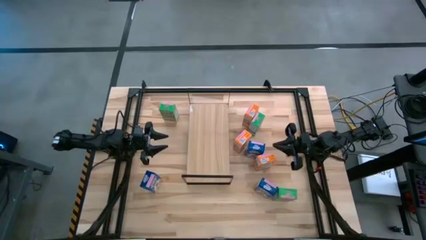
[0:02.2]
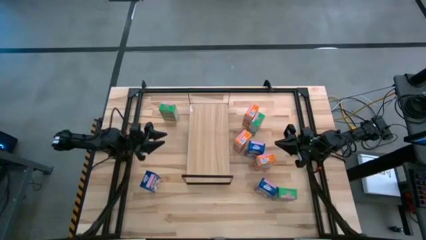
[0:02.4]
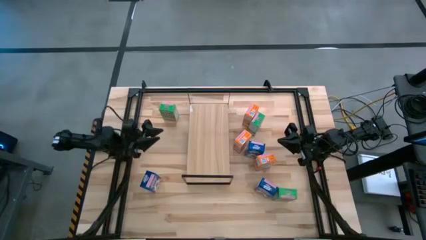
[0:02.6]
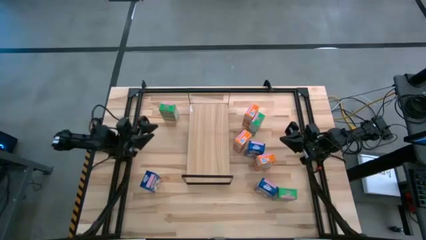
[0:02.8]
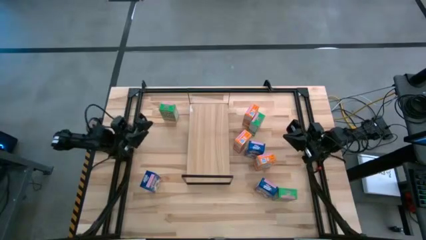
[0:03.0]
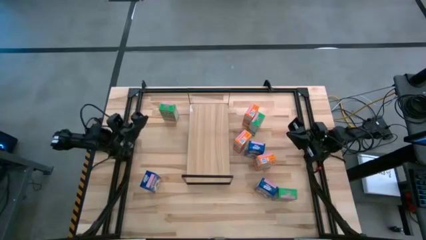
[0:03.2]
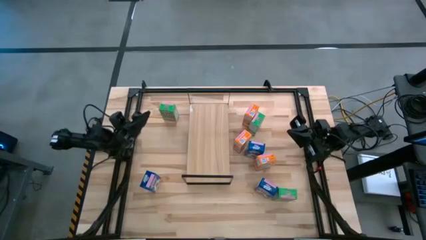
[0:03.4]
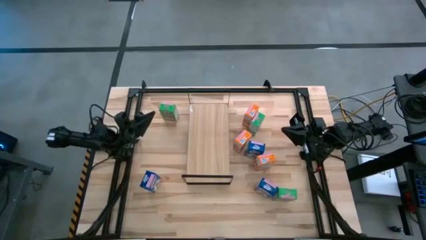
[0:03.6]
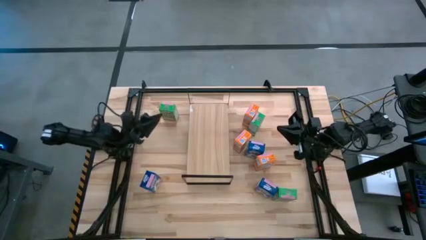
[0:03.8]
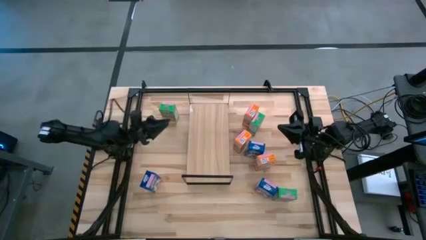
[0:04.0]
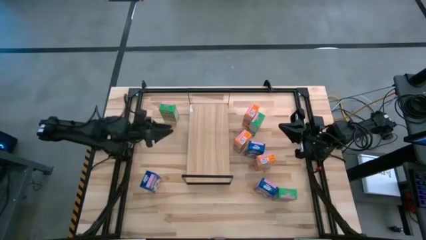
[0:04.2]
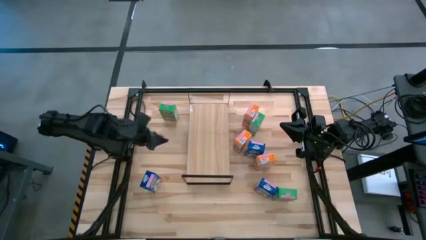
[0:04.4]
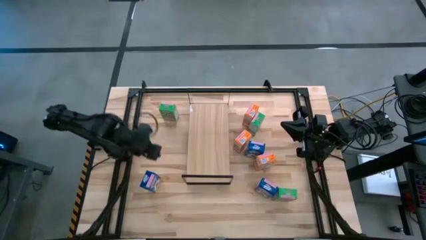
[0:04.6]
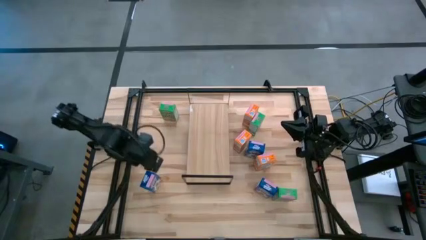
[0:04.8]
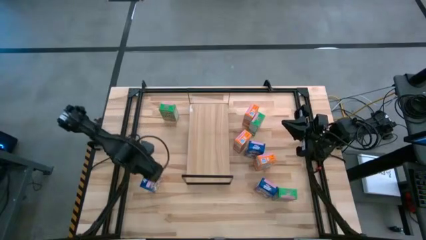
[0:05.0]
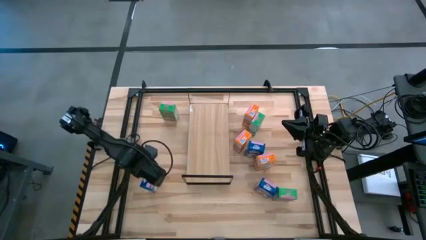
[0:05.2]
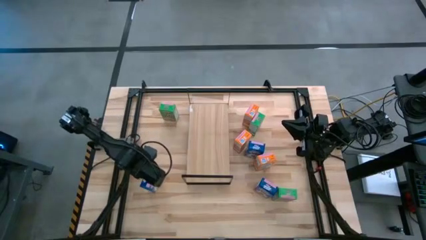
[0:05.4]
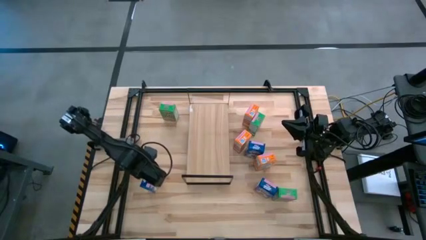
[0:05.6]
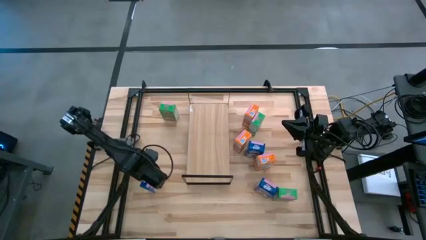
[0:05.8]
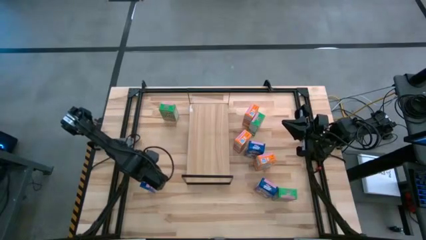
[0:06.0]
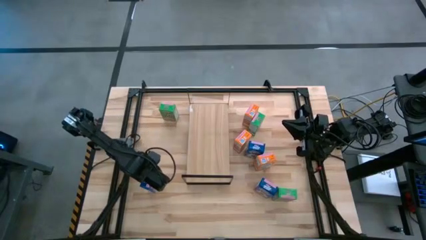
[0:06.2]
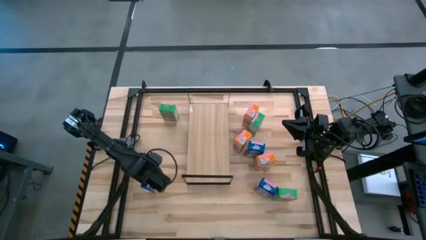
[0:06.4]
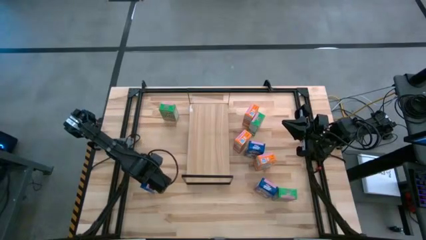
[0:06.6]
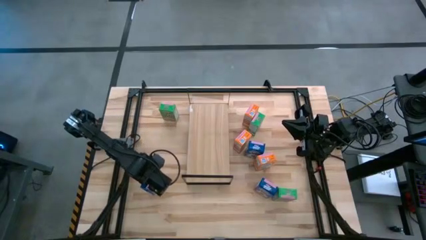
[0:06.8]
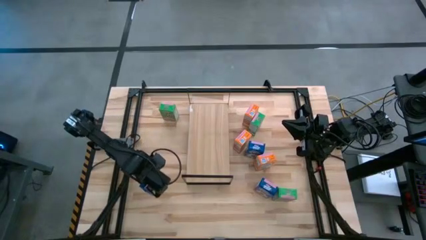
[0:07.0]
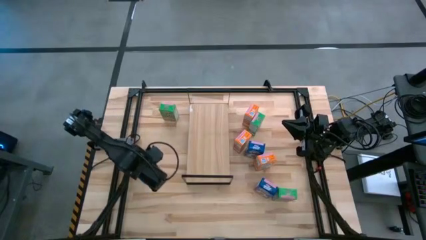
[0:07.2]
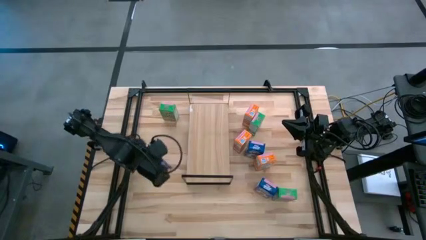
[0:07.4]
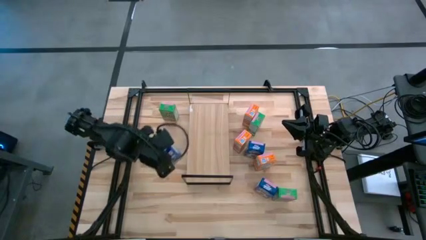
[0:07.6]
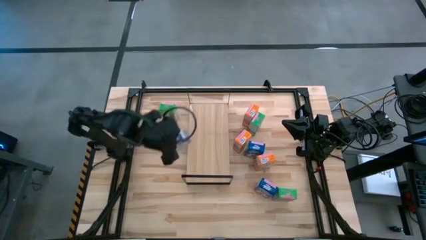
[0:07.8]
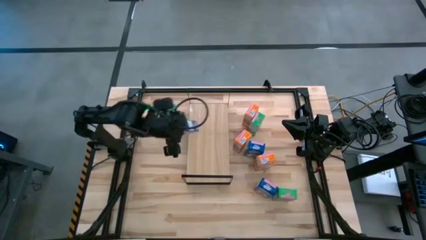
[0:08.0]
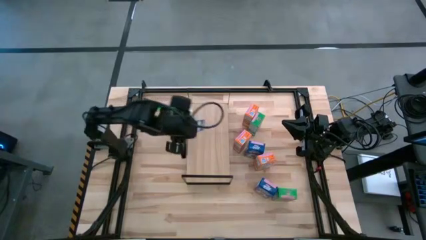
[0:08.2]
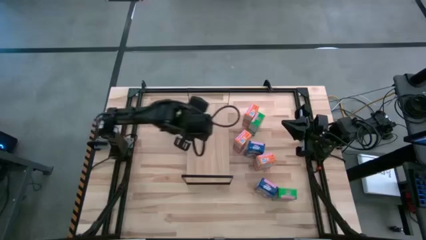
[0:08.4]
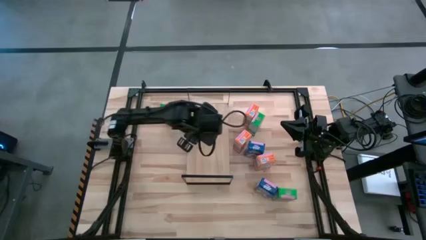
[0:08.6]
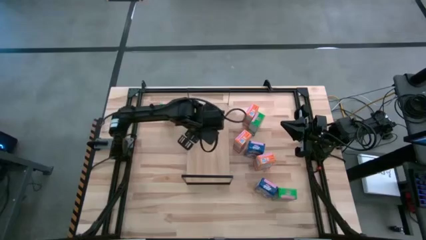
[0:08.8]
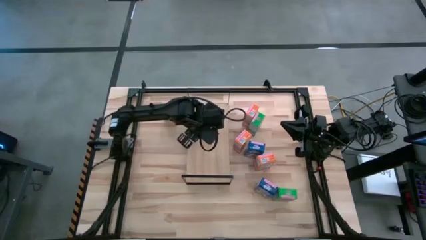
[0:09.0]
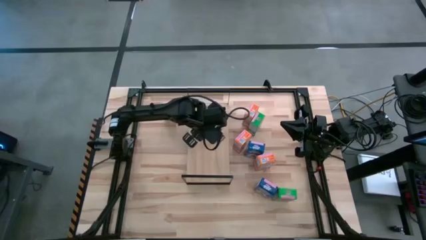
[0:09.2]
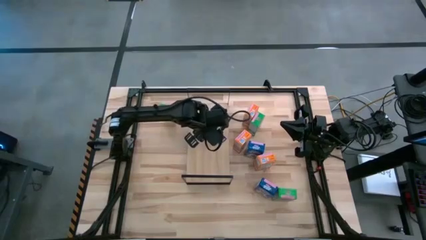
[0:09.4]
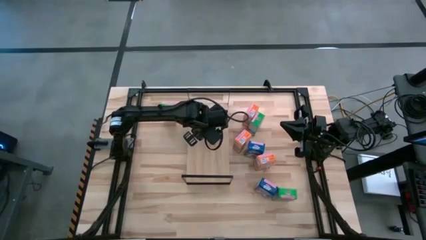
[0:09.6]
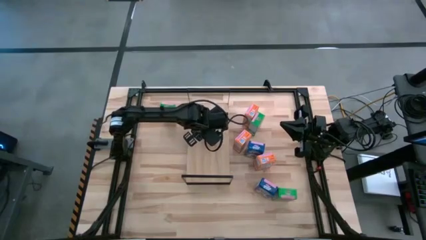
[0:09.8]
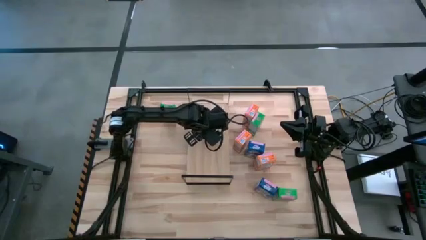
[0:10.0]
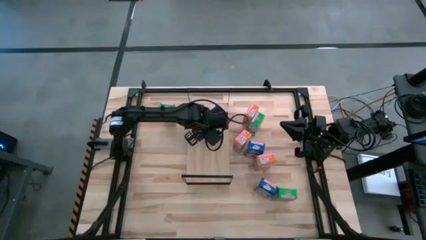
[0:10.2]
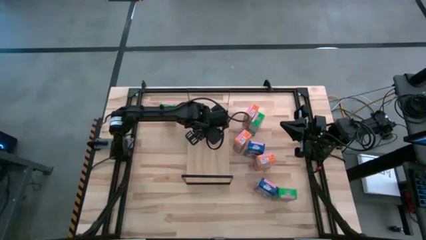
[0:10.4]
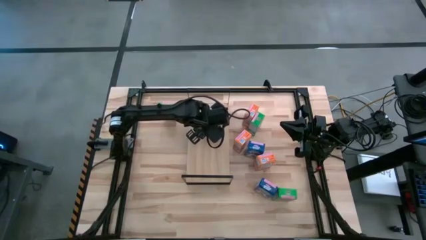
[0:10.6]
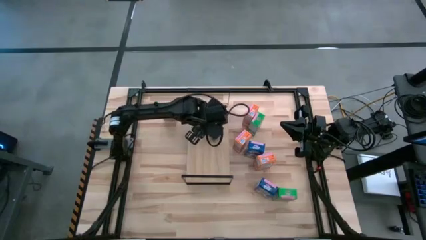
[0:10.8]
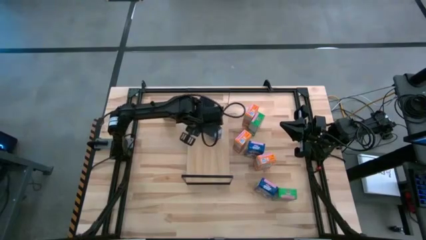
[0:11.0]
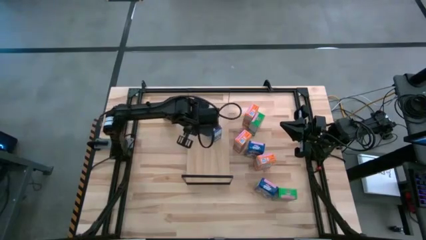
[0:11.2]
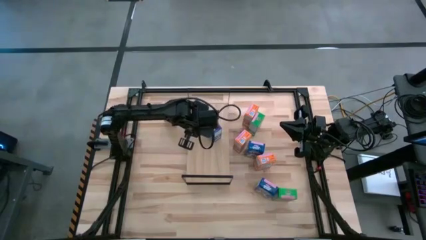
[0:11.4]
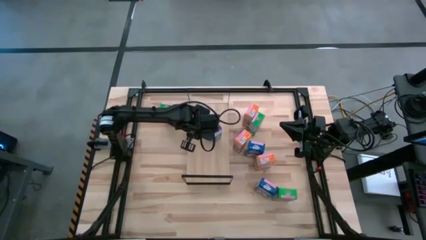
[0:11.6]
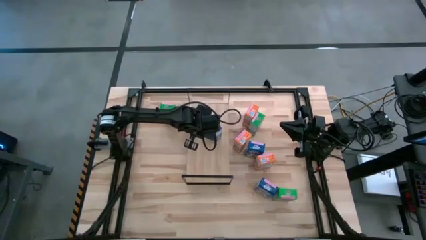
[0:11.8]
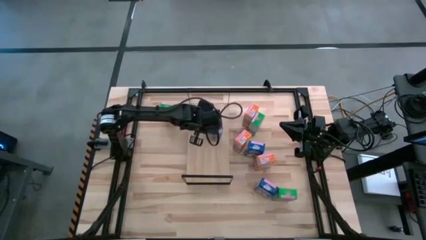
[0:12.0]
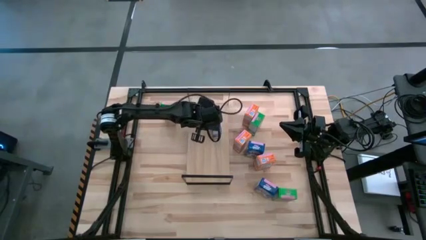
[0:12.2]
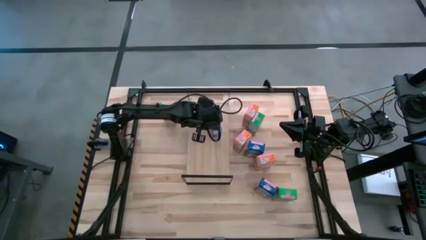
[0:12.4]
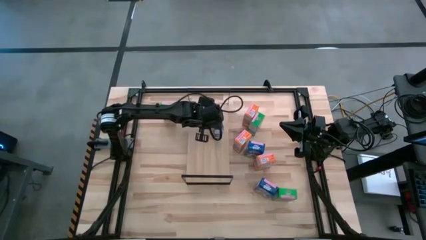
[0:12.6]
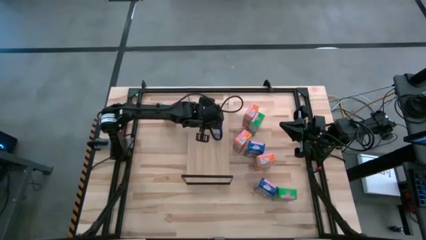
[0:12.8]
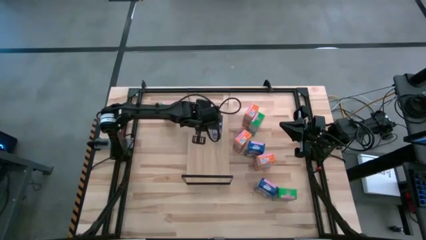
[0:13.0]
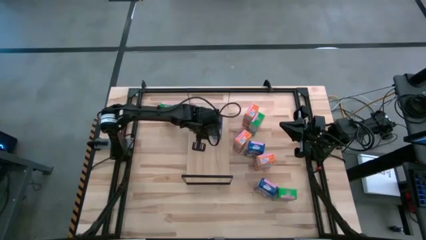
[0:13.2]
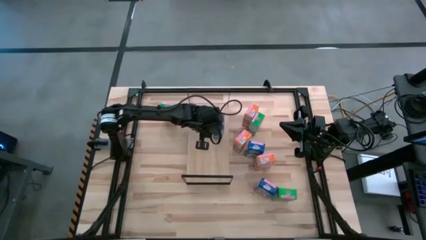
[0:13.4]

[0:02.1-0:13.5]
Task: Stack cereal on shelf
Put the bottom left blue cereal box on the shelf

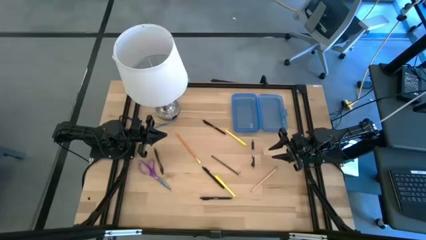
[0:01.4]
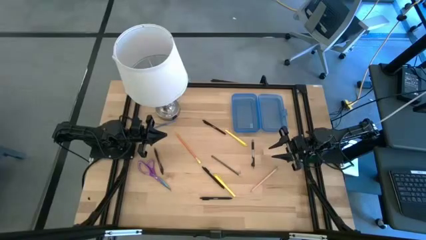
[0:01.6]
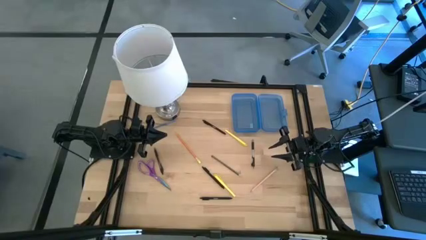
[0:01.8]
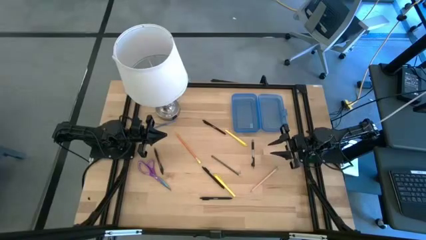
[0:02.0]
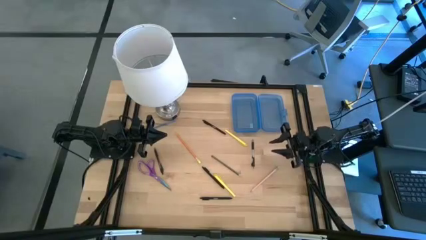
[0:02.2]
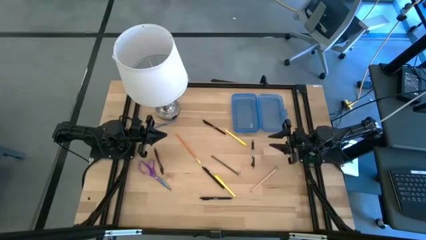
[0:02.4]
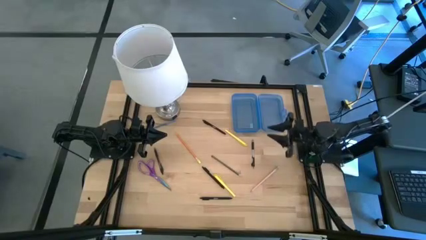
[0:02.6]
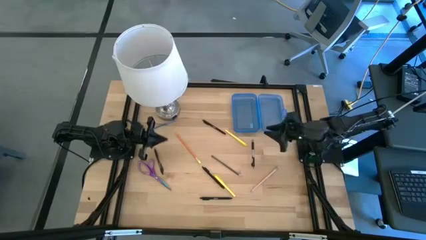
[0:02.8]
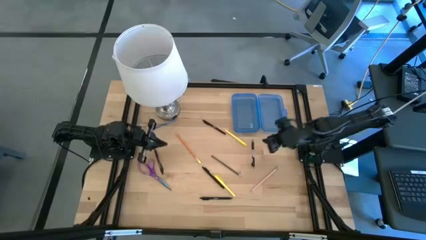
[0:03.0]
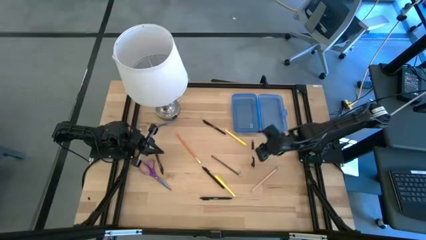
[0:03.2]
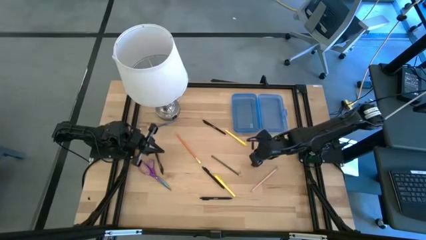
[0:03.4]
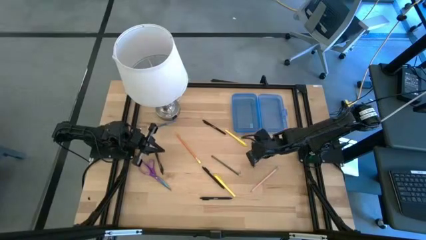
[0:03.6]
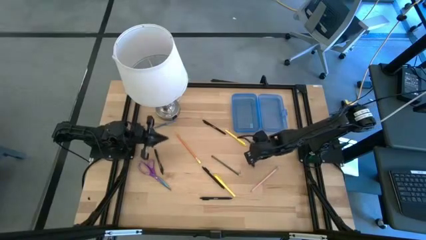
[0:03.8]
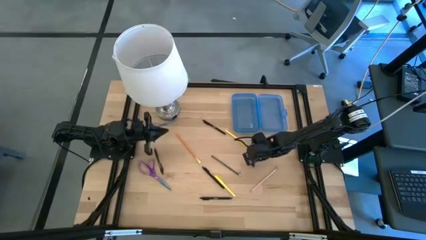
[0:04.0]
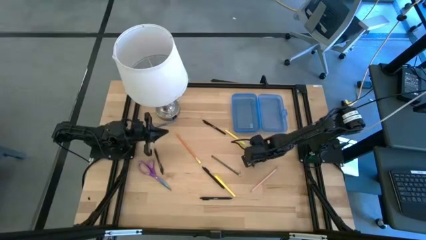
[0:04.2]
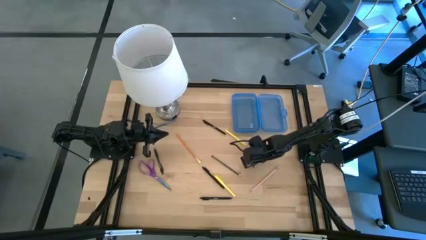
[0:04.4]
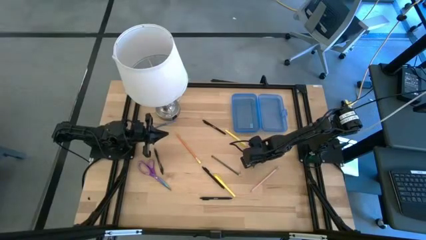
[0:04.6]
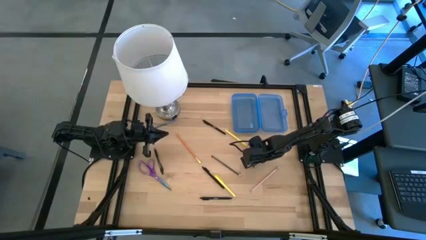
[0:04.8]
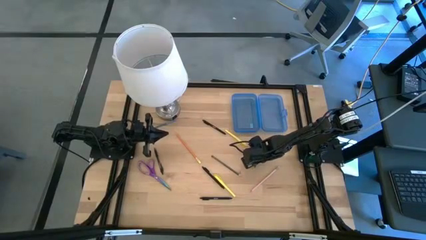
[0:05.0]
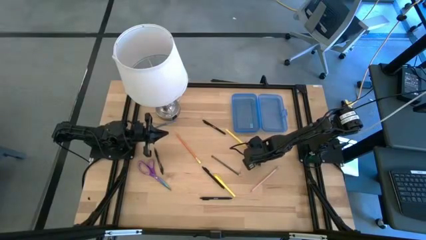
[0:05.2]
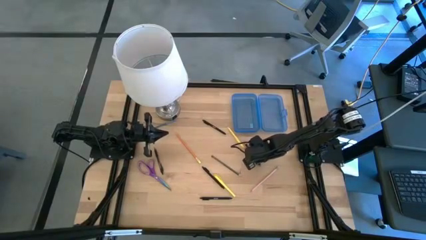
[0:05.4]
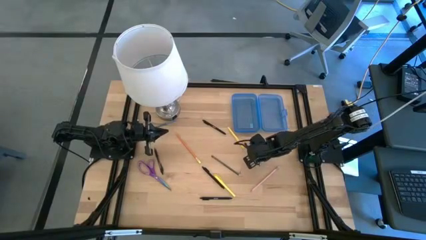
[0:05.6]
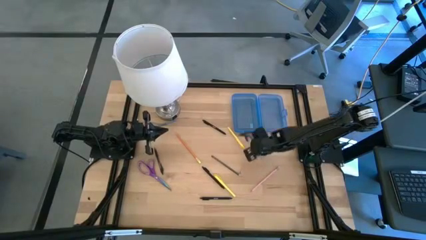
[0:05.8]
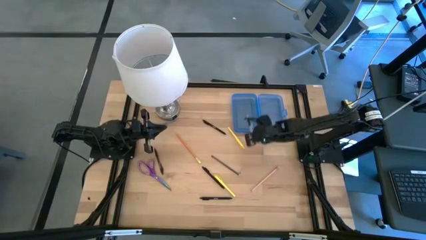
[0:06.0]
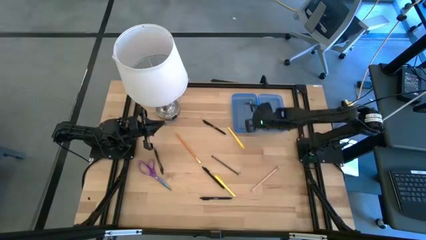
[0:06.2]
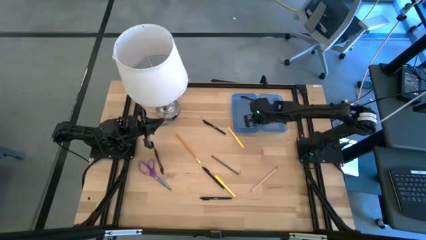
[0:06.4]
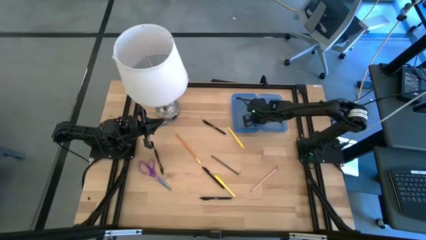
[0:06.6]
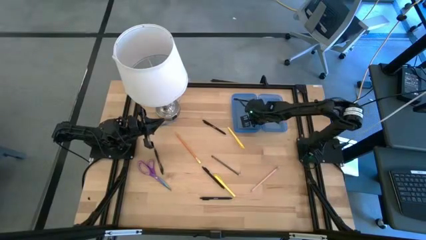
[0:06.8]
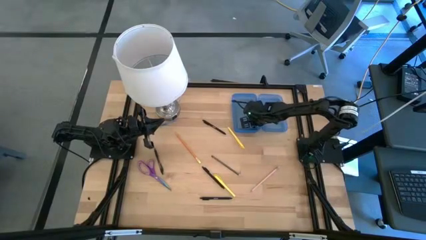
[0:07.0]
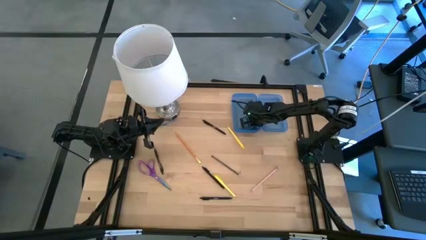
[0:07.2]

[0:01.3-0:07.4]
Task: Pick & place school supplies into a supply box
Put the right black transparent pen into the blue supply box
